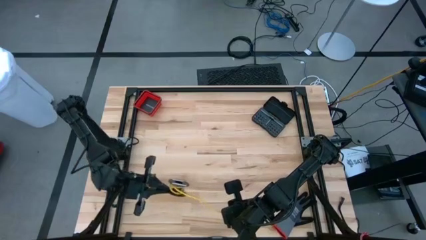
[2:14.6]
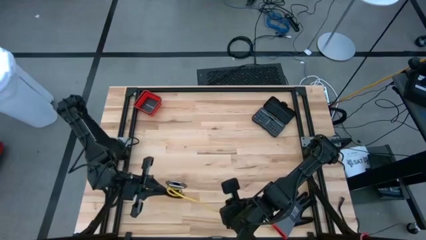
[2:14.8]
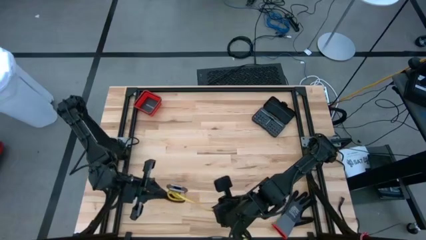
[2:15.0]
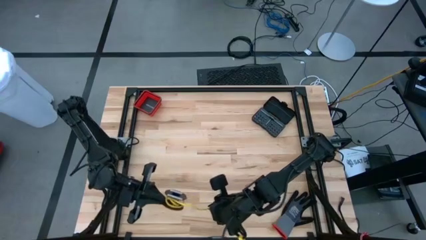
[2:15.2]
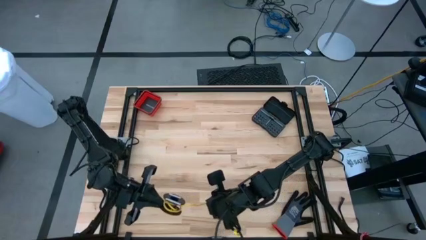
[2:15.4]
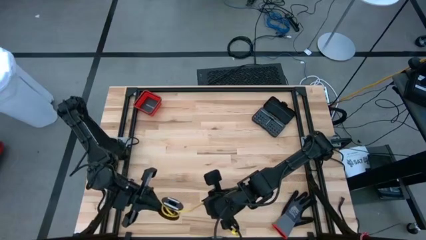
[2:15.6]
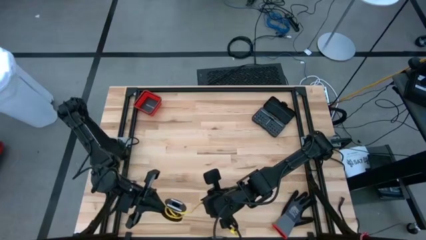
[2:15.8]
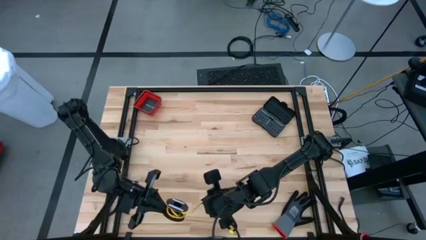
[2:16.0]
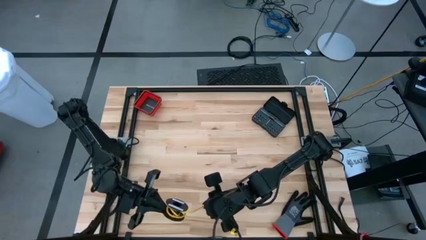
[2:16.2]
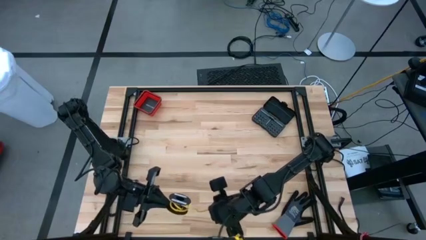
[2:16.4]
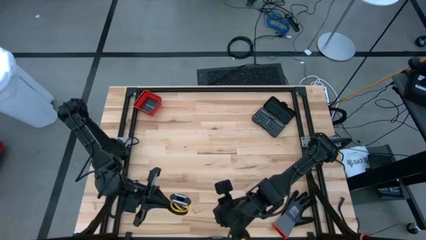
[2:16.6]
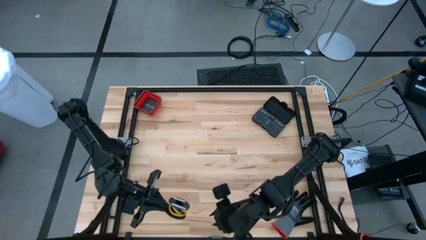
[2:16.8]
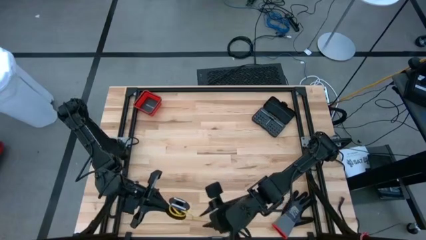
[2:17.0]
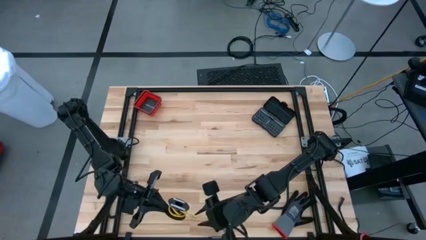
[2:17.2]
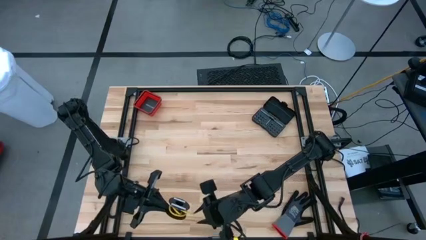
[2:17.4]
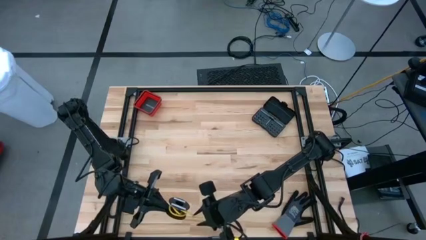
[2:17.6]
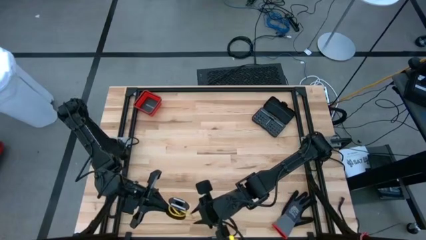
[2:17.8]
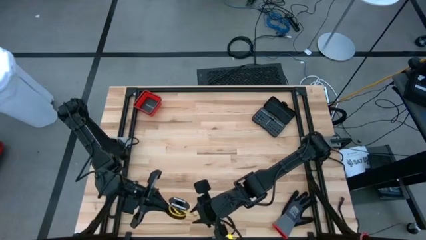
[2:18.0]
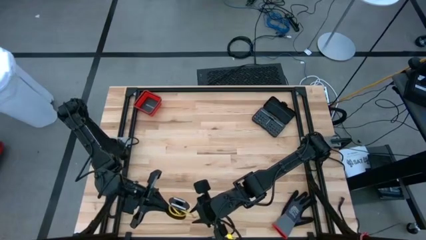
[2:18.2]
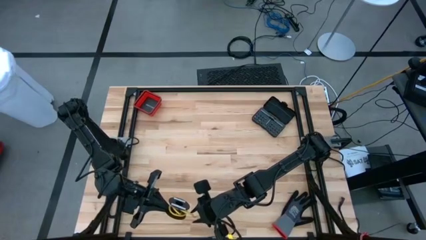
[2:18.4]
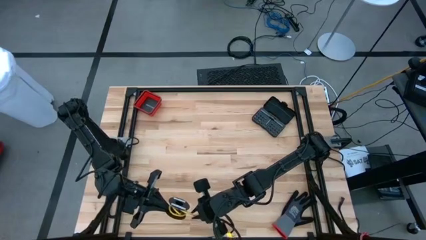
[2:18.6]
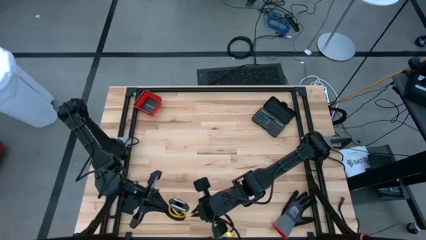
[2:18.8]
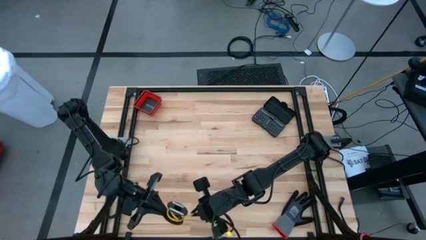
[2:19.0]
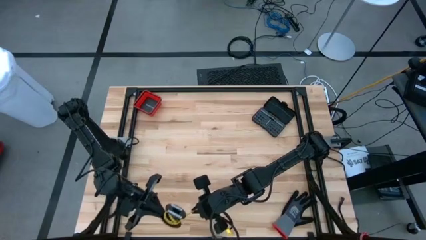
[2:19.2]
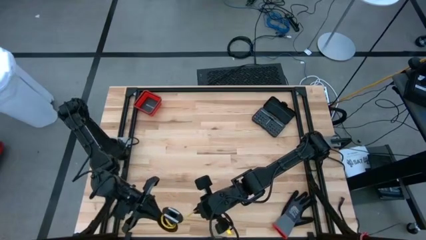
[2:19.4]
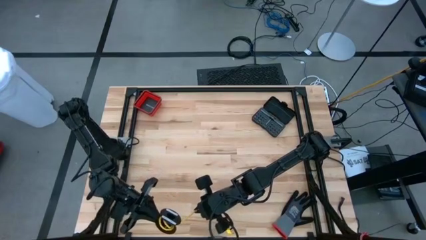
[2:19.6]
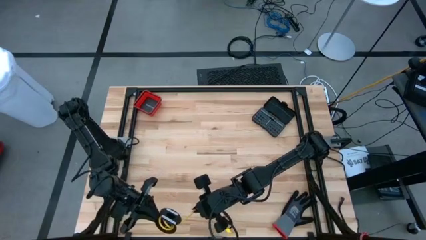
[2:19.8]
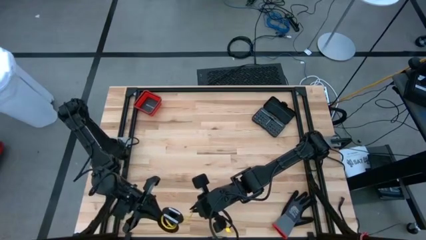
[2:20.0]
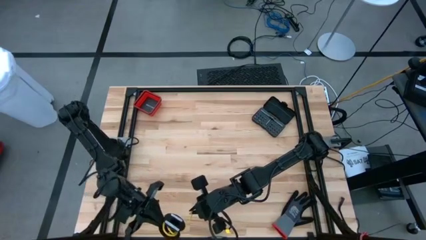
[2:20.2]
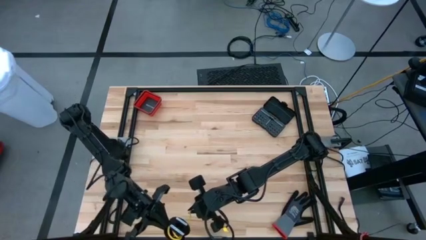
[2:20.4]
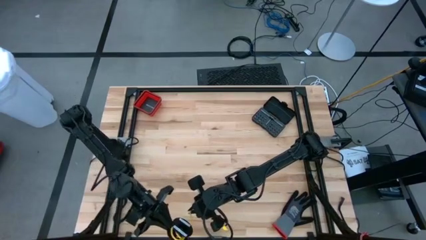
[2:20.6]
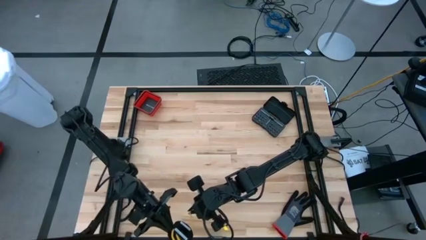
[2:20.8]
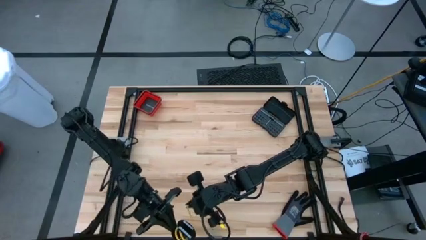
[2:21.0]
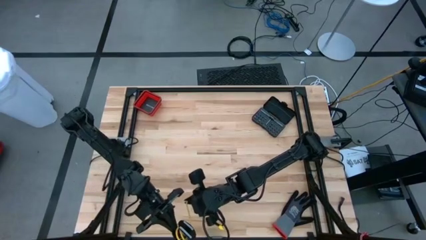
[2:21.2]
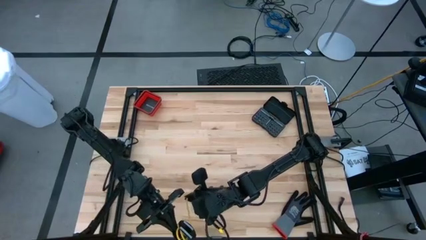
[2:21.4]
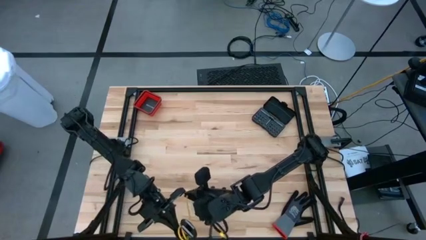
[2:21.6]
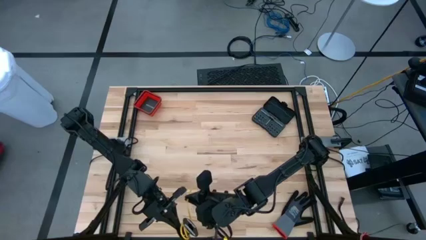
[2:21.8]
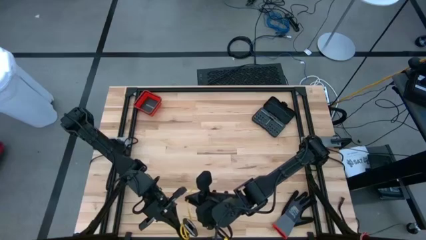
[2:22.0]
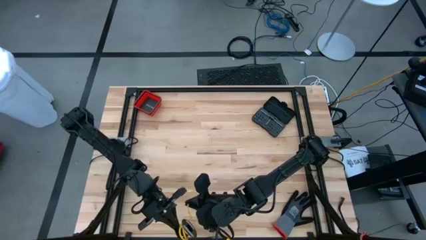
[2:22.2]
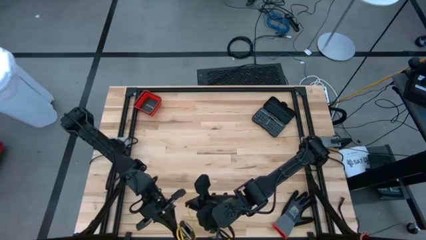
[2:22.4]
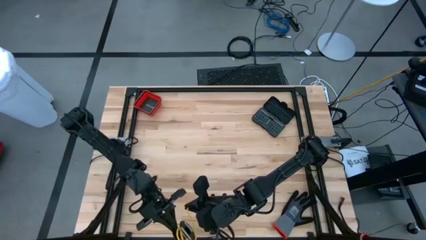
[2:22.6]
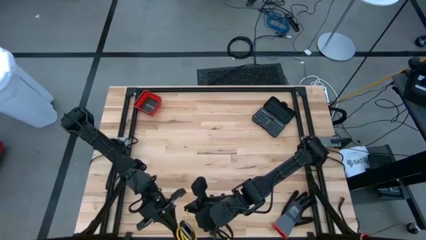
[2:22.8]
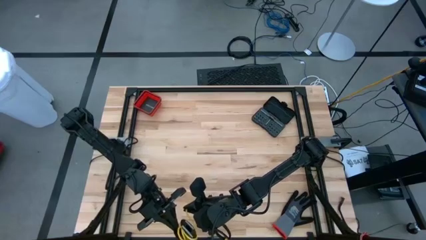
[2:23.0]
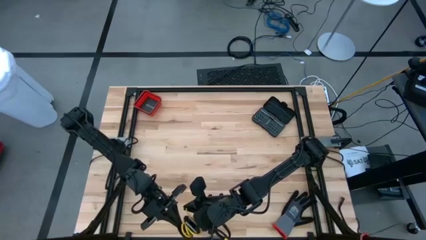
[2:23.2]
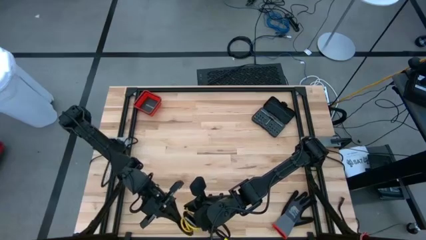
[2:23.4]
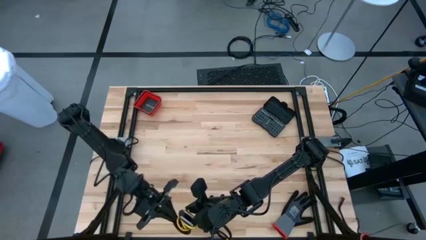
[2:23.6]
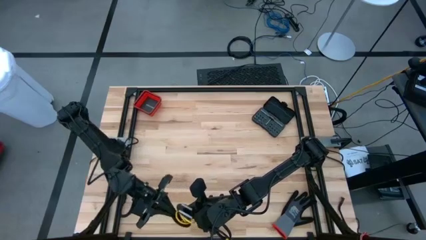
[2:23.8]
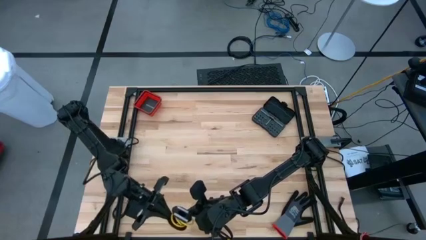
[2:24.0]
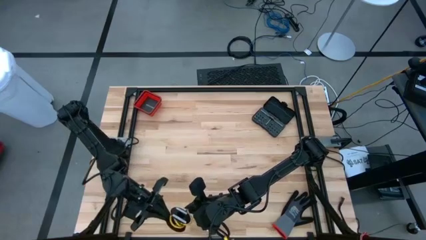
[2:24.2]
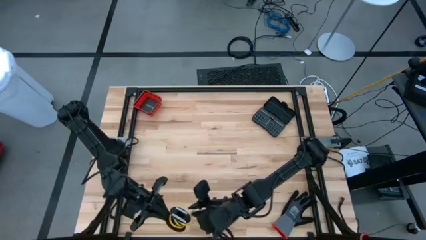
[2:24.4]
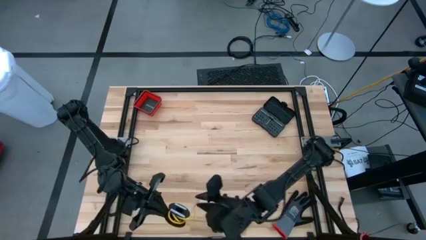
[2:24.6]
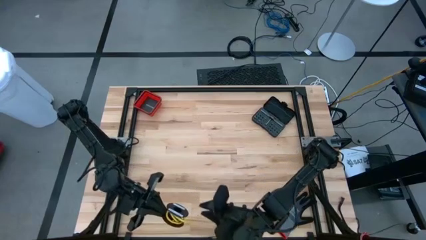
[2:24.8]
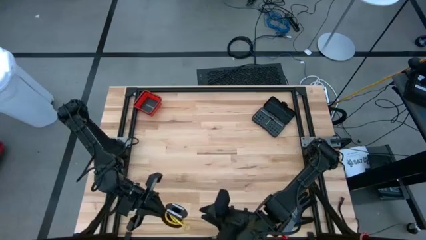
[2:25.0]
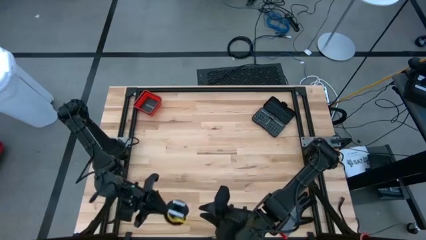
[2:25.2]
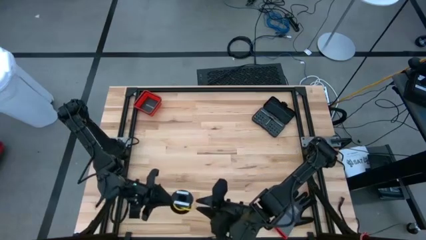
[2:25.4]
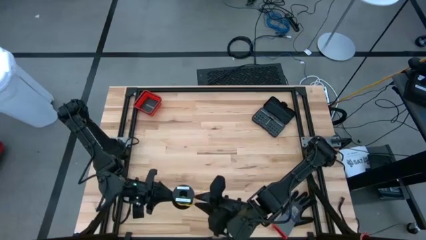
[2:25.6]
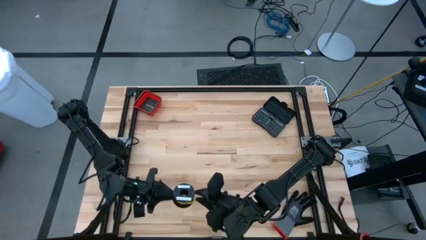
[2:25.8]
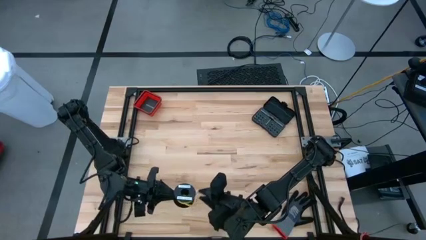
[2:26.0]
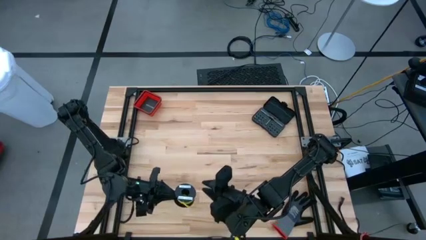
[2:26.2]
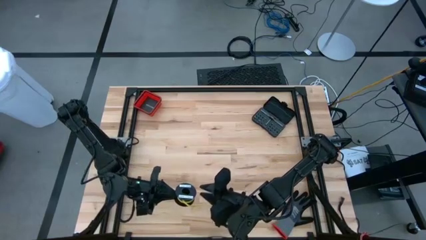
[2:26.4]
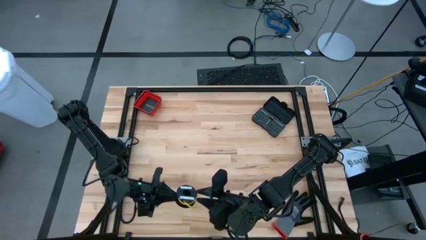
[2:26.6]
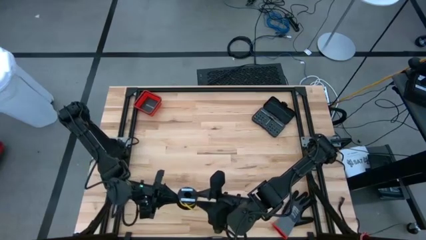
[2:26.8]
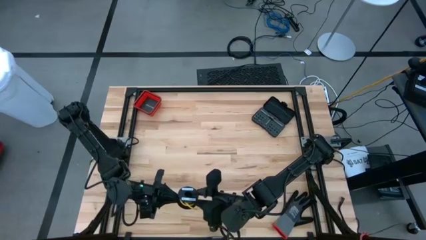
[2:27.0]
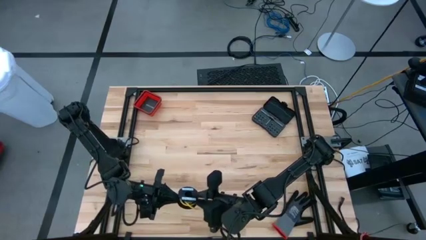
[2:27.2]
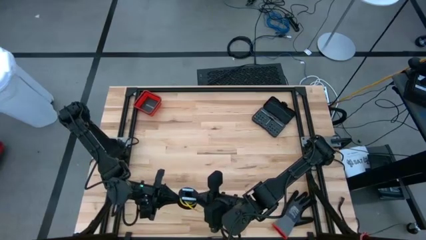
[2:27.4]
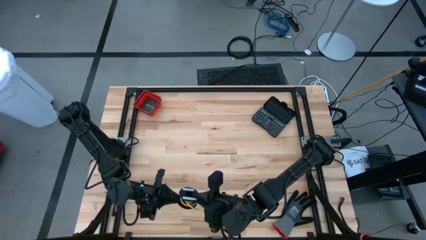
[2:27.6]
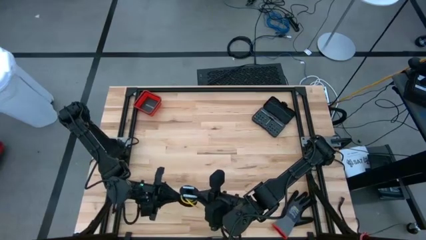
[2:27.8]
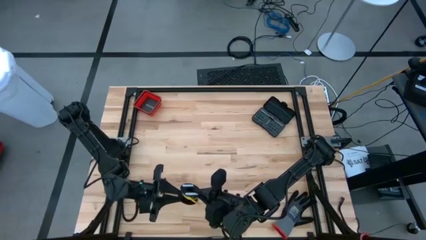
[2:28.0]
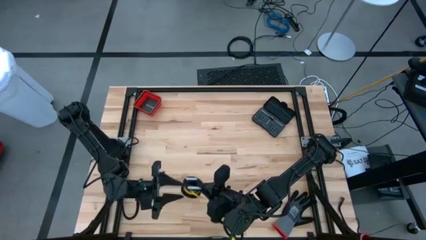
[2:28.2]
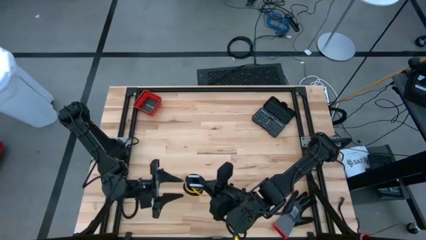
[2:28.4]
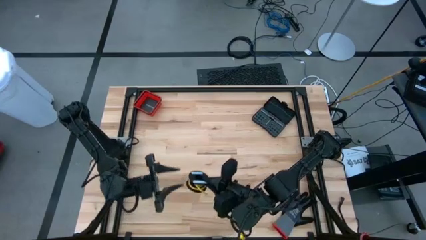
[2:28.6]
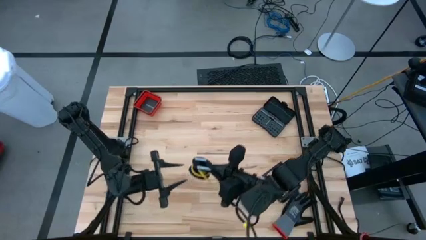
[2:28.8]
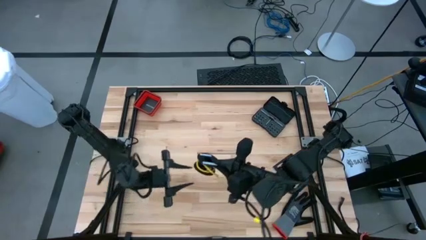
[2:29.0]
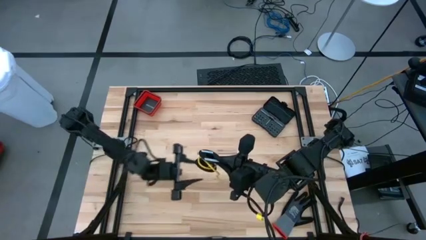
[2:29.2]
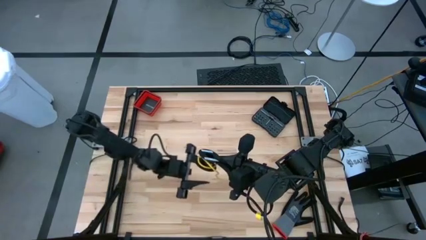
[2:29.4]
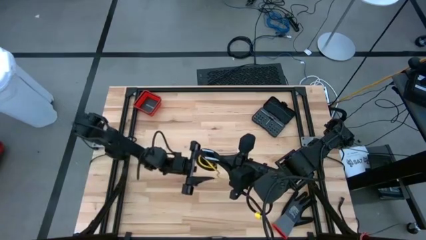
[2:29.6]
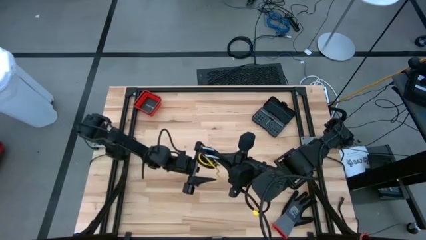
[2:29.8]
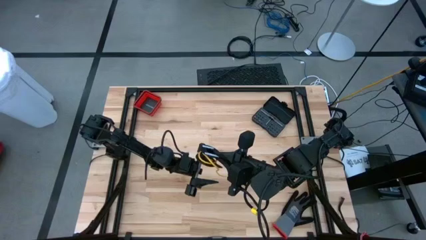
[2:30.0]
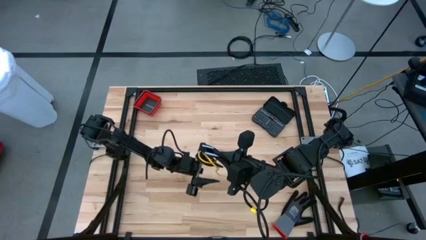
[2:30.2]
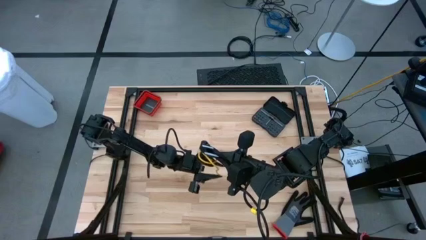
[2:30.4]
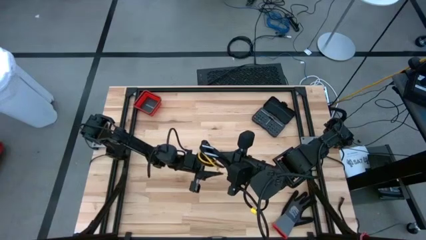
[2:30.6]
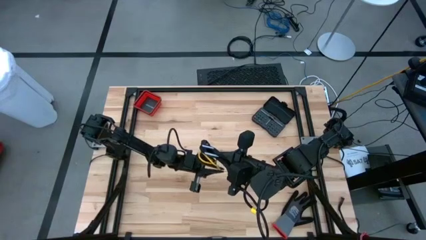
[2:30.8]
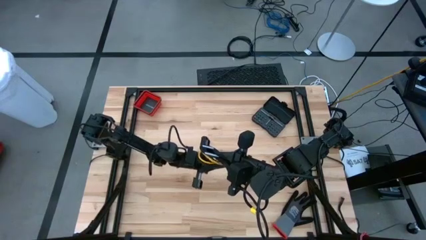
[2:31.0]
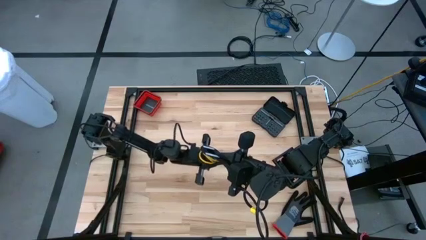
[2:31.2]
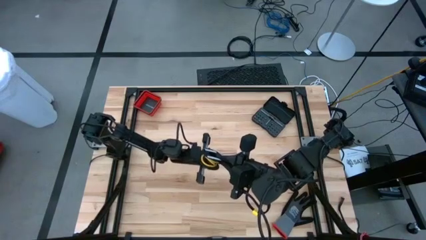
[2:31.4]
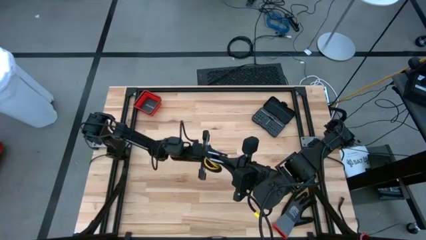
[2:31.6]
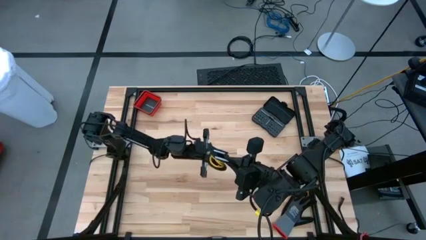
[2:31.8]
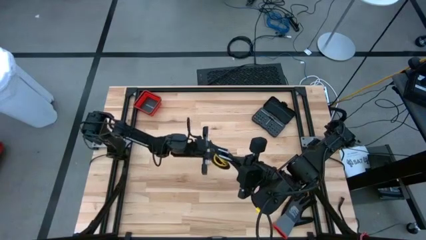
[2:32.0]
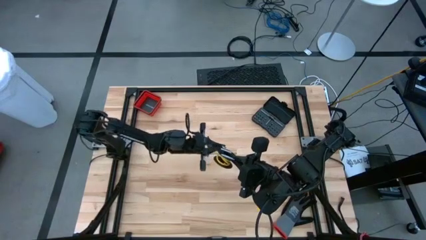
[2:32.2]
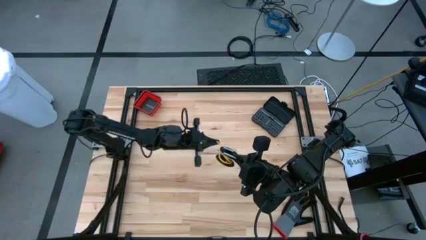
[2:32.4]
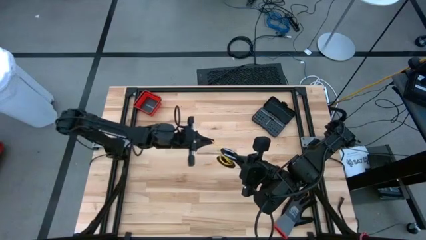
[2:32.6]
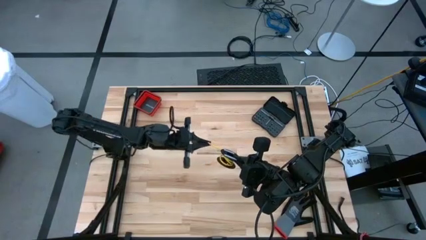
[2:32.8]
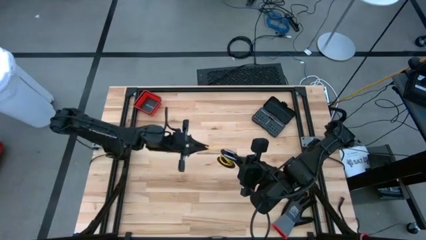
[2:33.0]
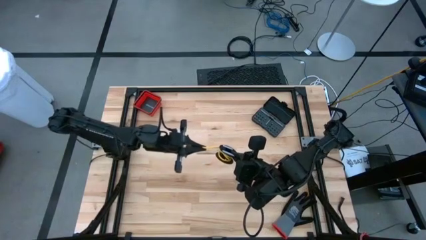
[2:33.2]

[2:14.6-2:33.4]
Task: Coil cords
Coil the yellow cable wire onto the spool
